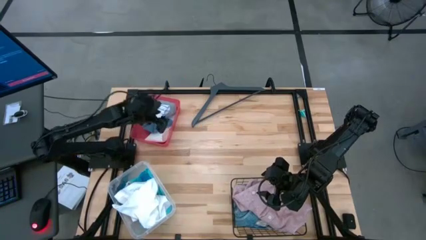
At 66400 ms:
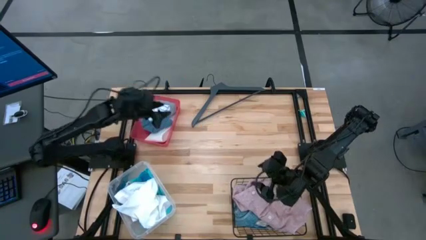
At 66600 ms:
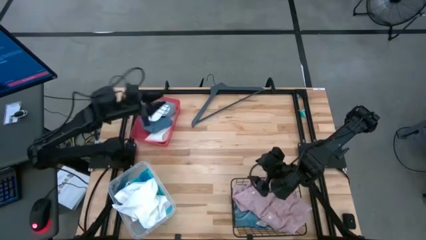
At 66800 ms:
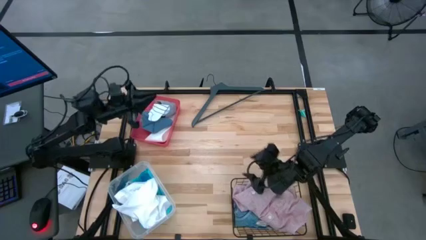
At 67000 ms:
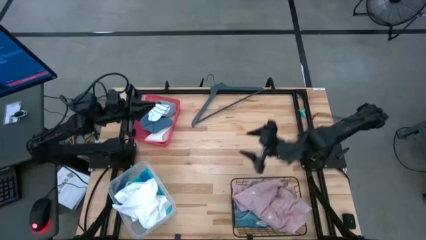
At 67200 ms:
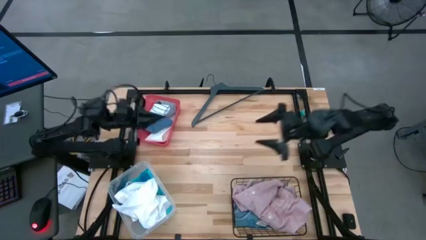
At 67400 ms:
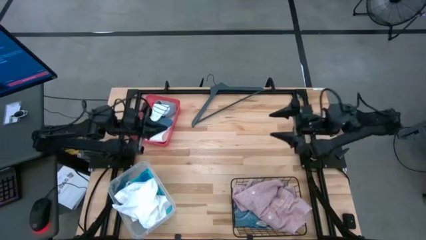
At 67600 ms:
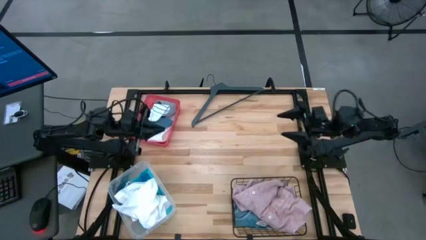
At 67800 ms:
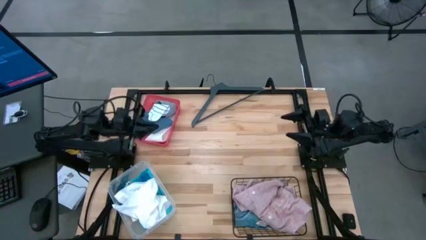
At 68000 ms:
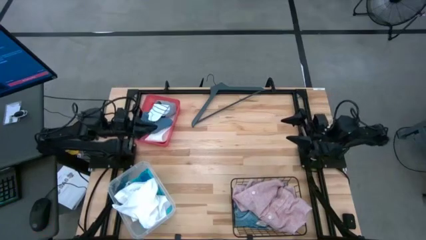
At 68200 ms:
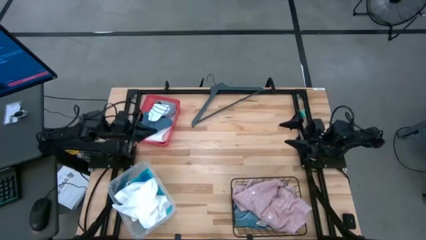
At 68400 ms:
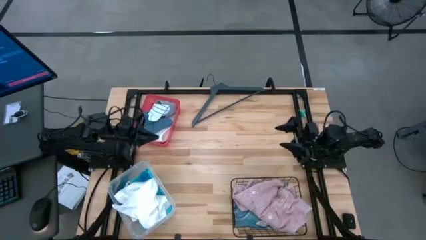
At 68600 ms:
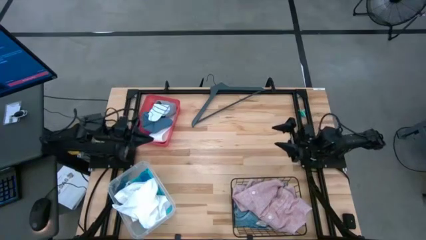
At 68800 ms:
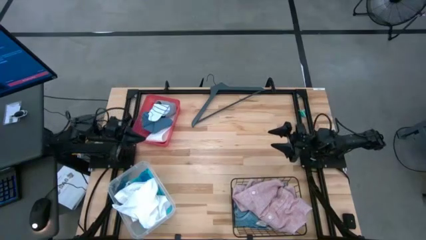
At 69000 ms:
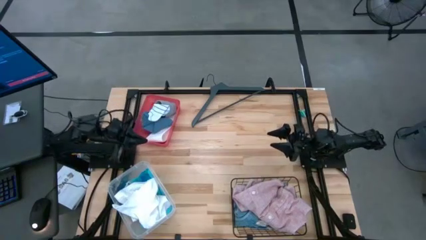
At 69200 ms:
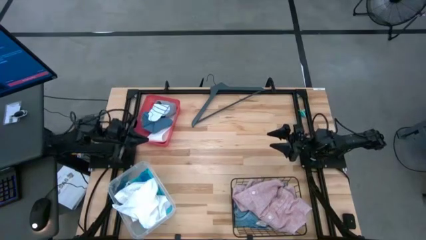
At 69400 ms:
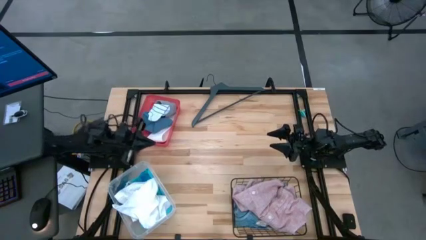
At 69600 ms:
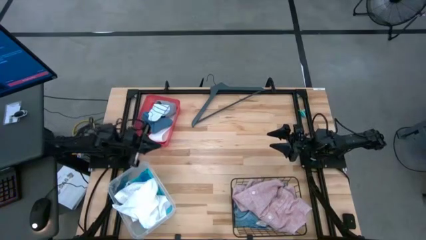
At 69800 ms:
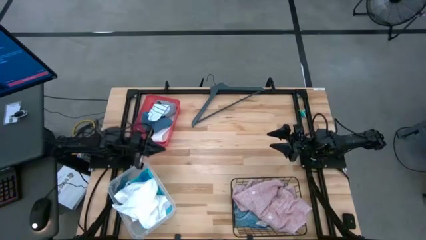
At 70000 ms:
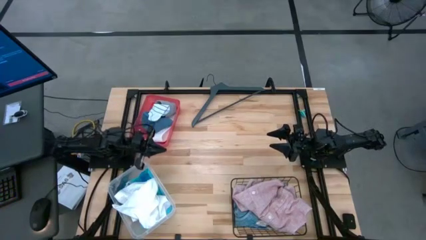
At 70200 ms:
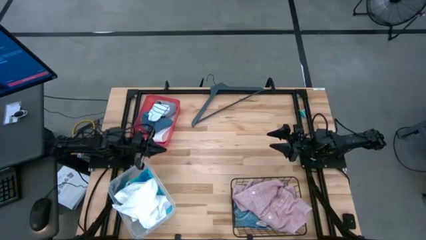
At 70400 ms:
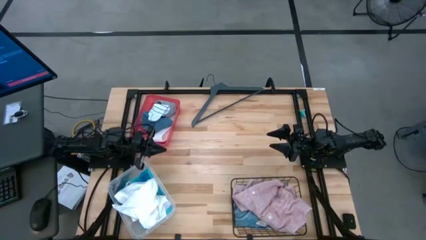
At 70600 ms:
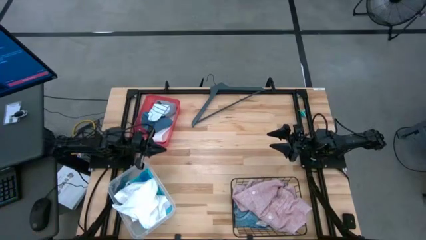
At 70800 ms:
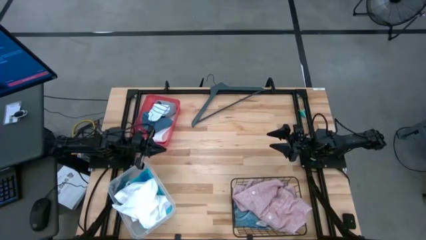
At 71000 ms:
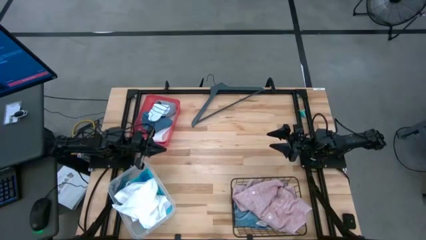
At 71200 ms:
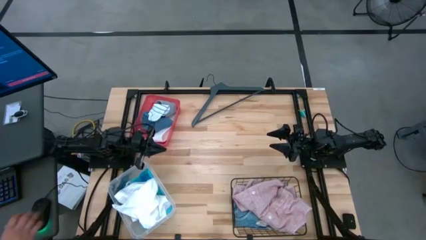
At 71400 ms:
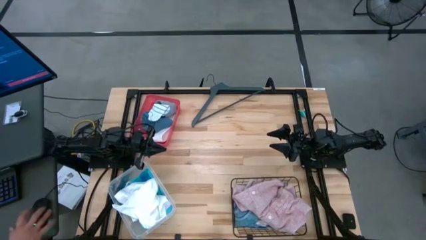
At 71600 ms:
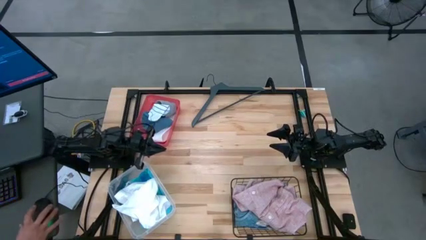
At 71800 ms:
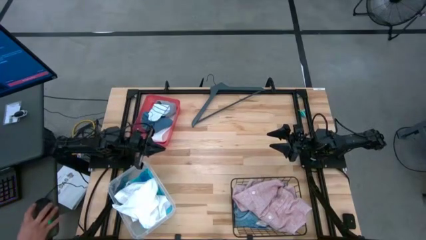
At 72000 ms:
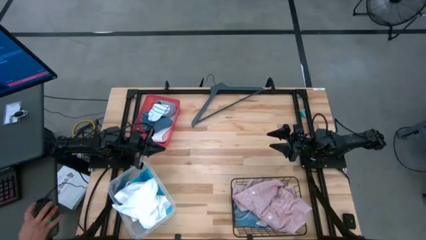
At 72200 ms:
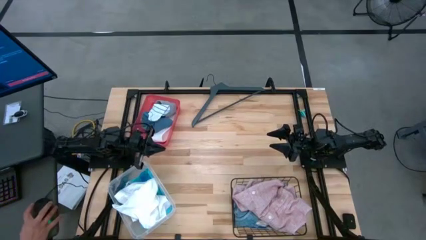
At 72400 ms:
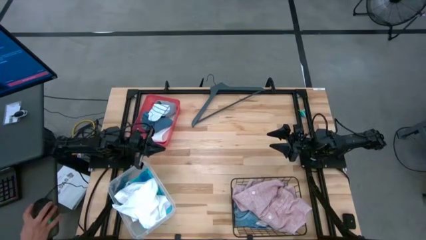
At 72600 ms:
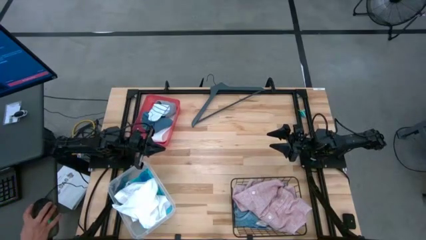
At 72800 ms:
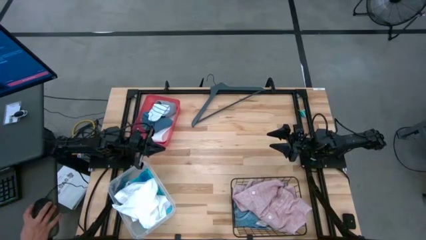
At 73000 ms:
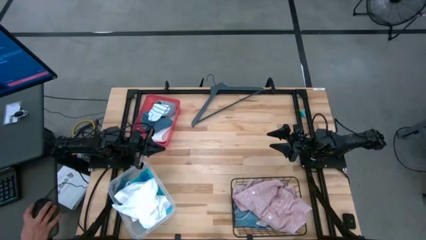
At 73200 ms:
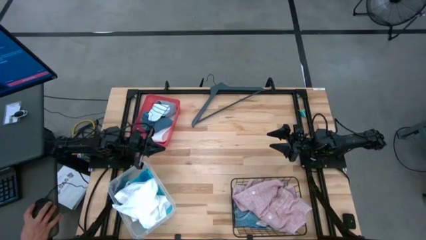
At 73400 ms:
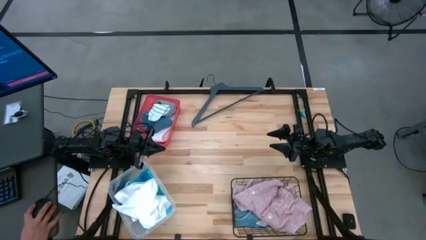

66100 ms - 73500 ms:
Task: Pick & Place Cloths
Return to Home Position

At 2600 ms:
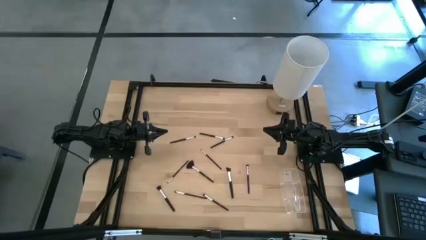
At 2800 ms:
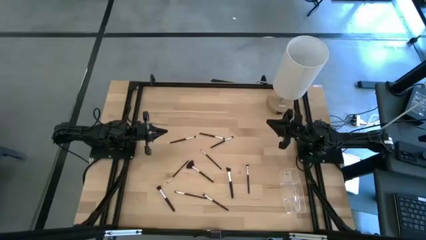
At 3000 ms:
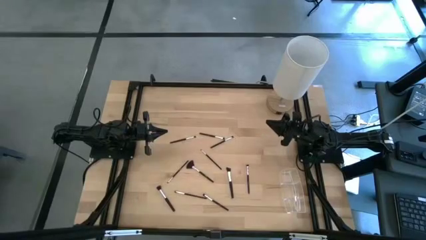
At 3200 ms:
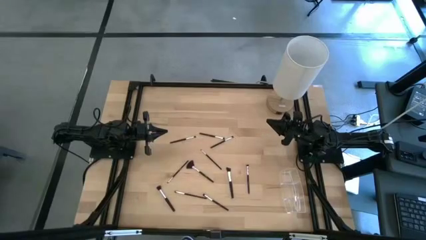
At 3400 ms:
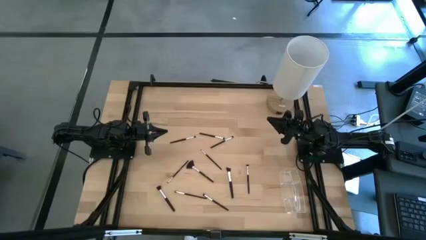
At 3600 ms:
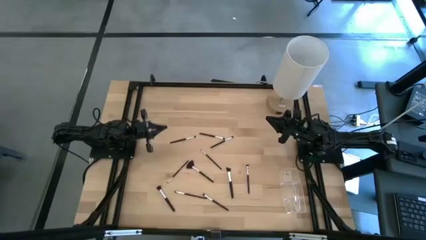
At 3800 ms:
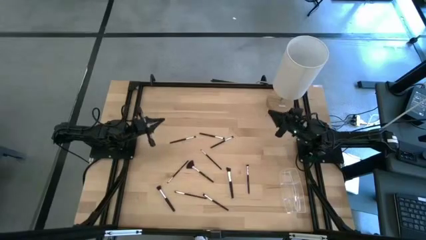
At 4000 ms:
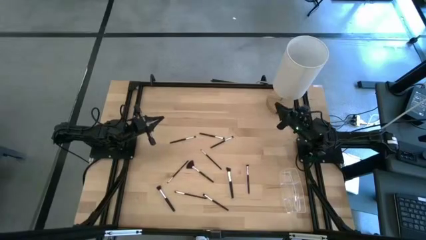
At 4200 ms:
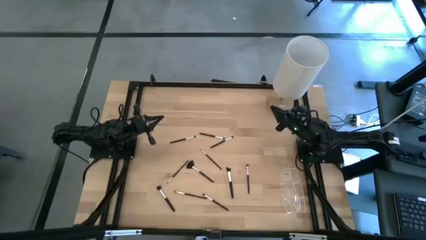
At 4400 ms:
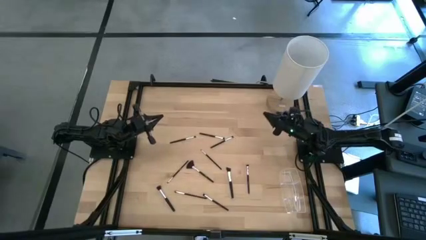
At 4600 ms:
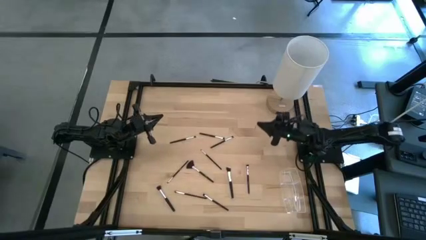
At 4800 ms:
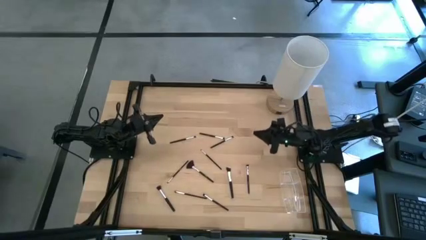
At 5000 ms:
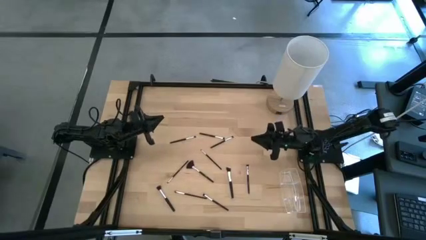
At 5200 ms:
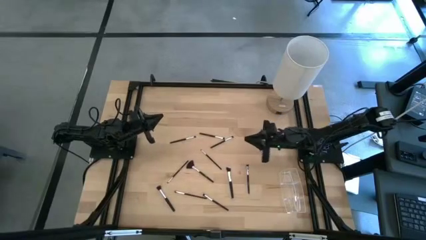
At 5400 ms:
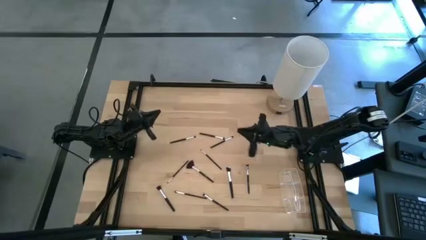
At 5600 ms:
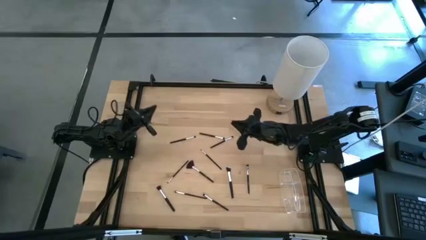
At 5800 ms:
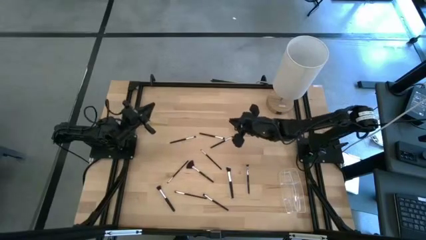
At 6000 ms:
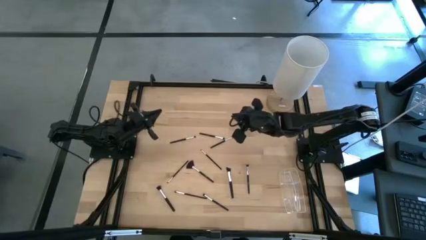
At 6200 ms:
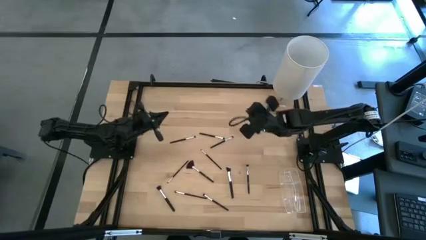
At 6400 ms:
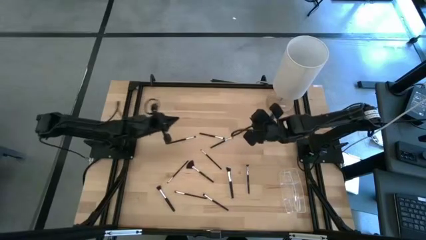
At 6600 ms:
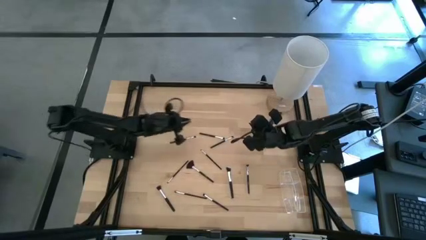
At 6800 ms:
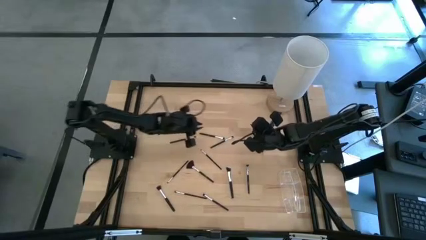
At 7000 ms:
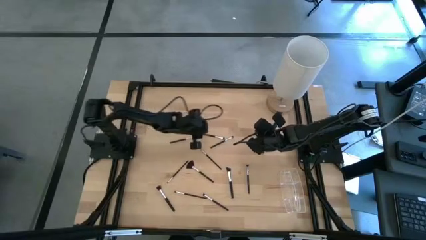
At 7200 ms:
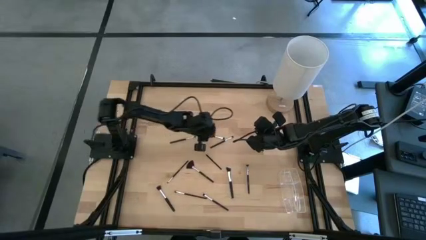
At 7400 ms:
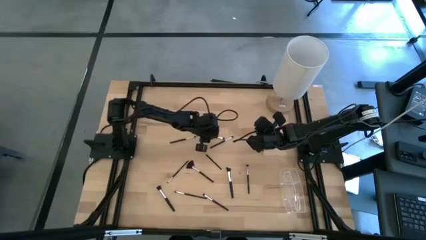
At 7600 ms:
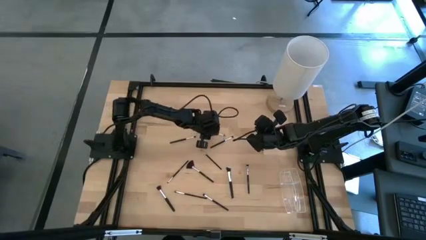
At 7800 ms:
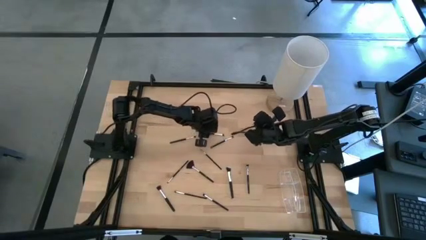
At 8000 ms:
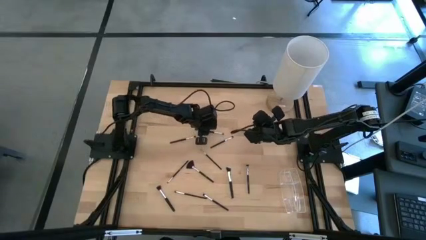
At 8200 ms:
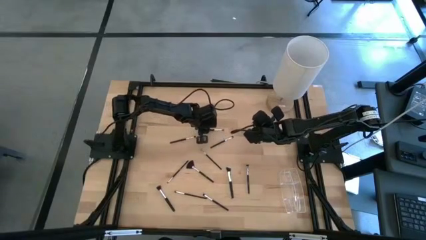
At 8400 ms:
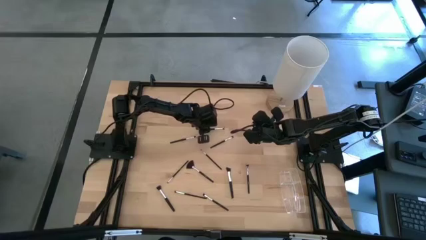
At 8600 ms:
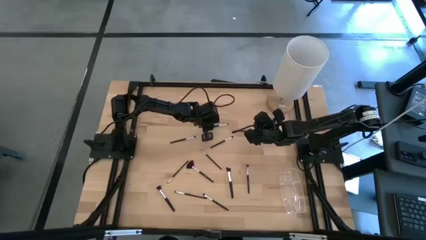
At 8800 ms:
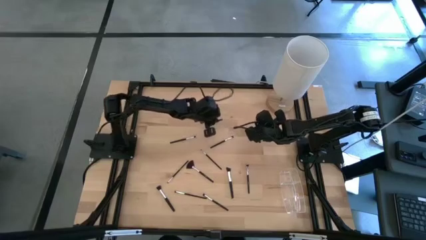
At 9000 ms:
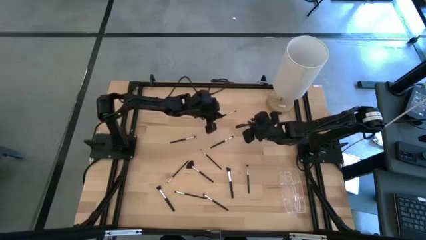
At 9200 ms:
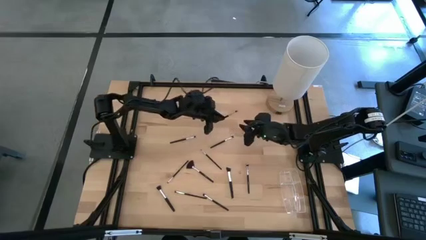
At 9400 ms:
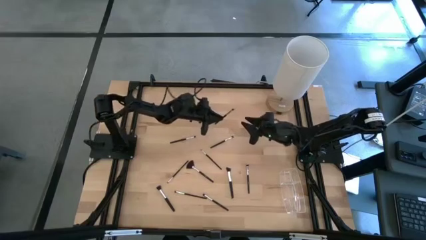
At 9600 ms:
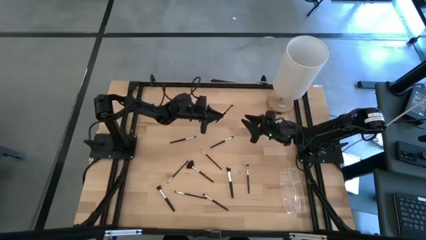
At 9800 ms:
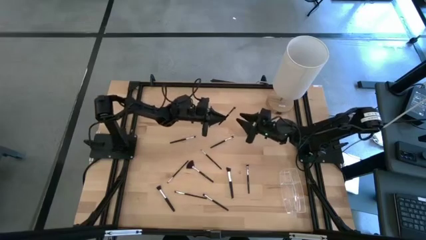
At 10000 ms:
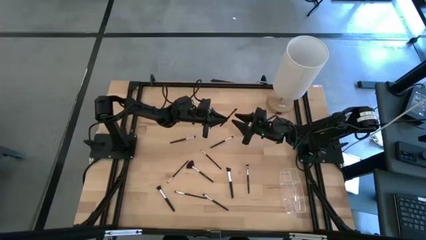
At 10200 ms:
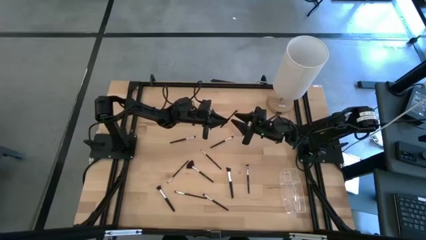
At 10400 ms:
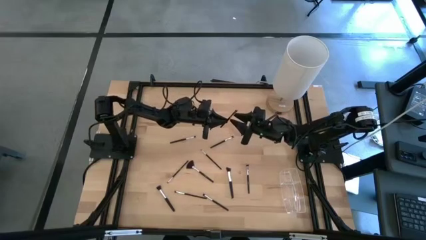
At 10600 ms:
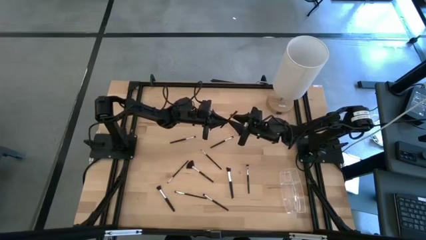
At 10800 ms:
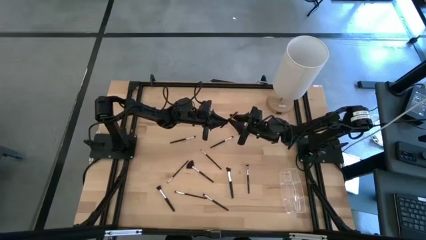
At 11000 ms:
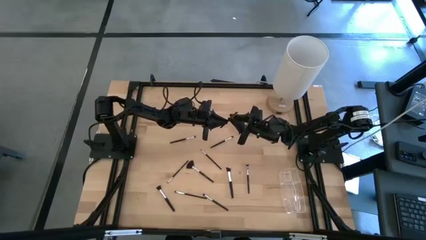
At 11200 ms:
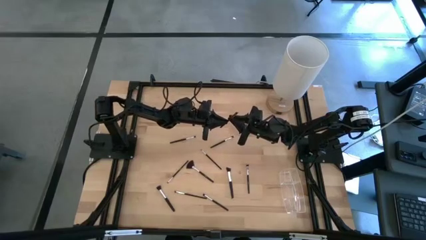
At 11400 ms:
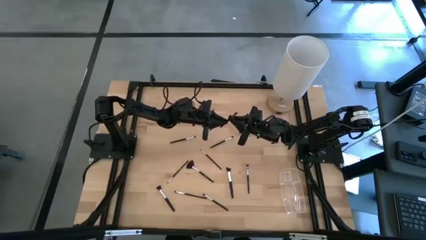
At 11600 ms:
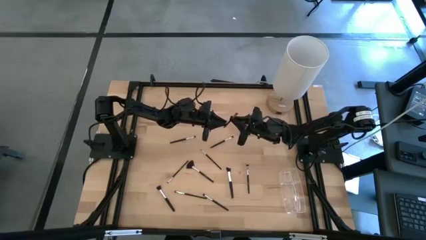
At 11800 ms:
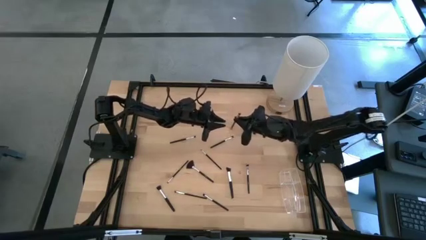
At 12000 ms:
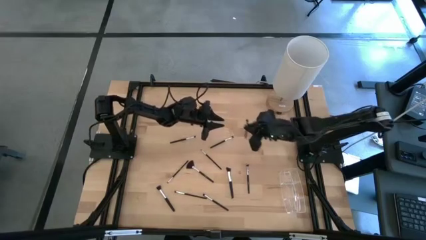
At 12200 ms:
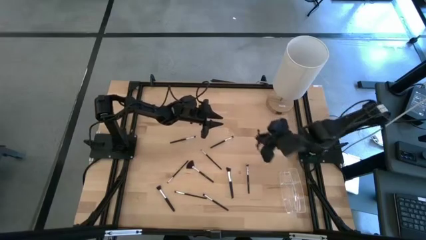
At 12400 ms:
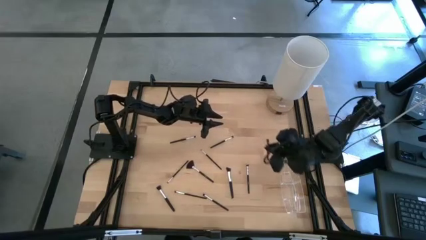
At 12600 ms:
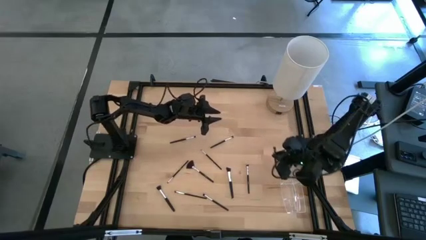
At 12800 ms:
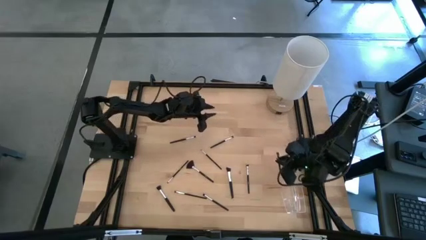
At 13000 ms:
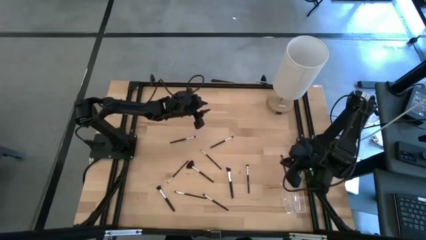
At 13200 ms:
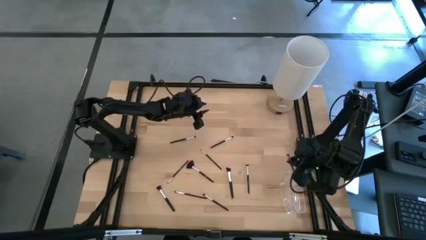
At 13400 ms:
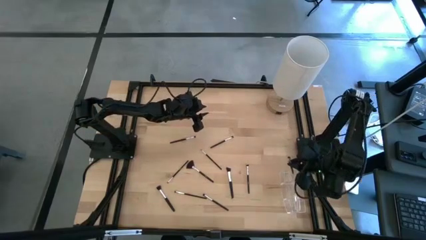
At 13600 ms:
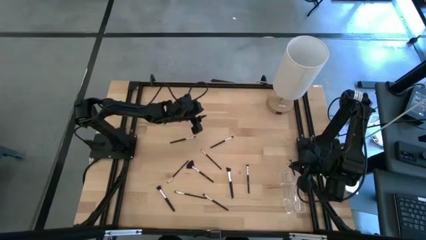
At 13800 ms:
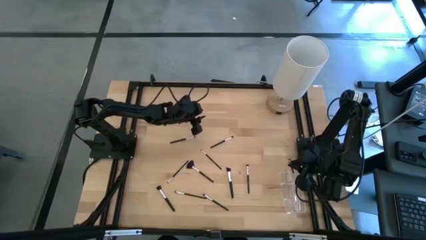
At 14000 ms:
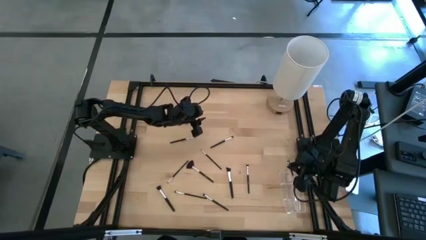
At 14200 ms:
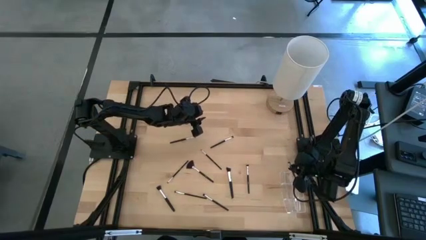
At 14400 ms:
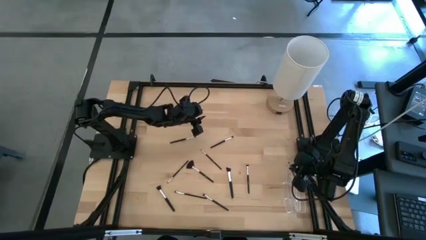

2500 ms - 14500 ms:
Task: Put items in baskets/containers
Put the foundation brush into the left section of the transparent organizer
